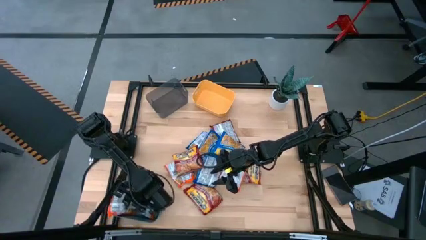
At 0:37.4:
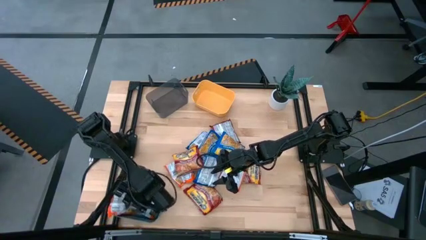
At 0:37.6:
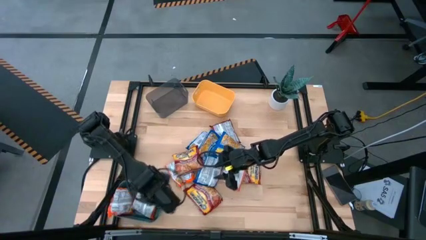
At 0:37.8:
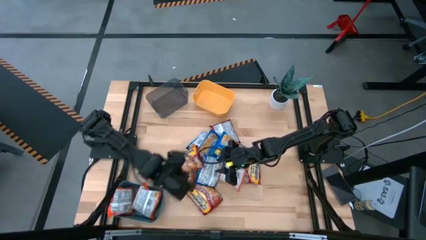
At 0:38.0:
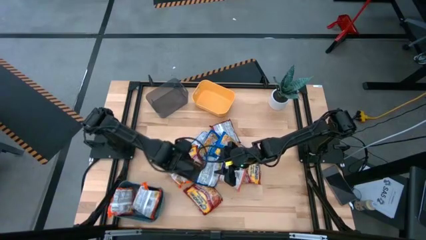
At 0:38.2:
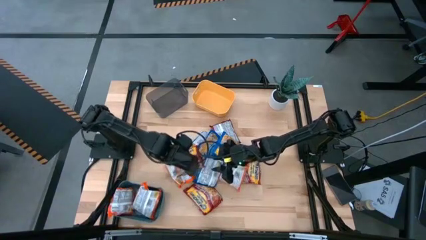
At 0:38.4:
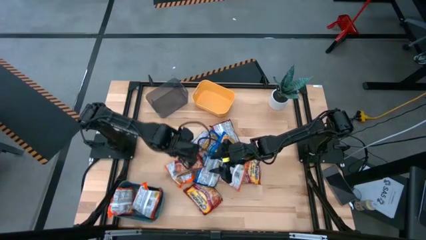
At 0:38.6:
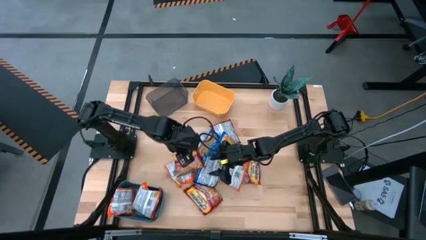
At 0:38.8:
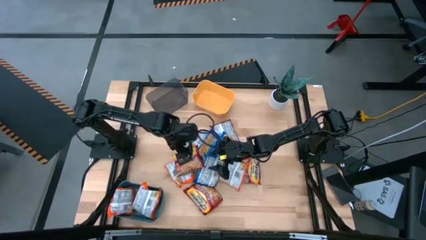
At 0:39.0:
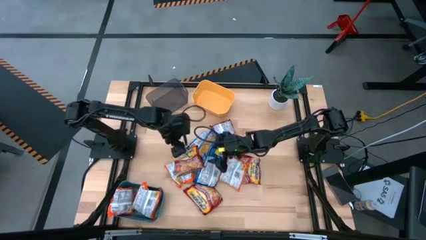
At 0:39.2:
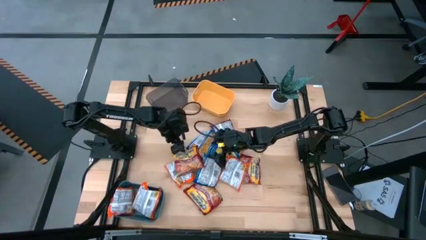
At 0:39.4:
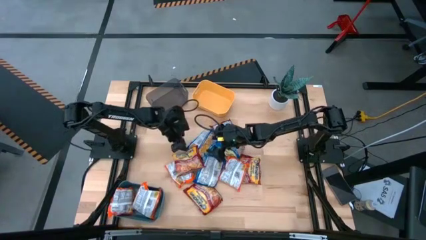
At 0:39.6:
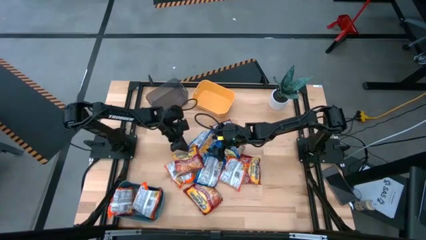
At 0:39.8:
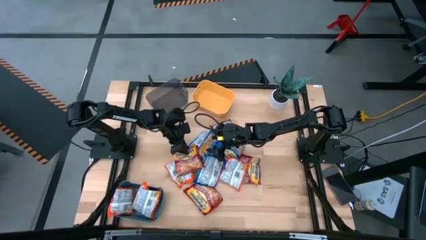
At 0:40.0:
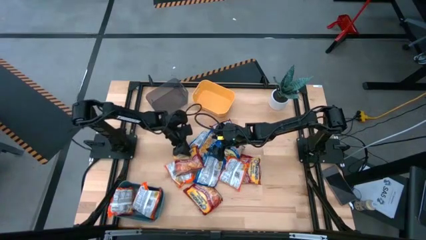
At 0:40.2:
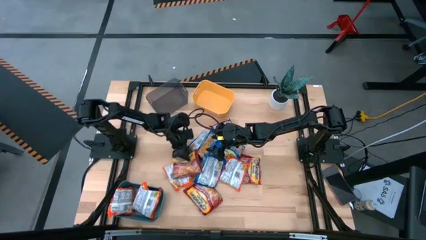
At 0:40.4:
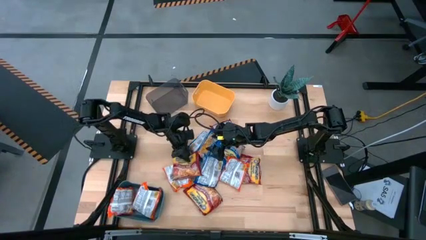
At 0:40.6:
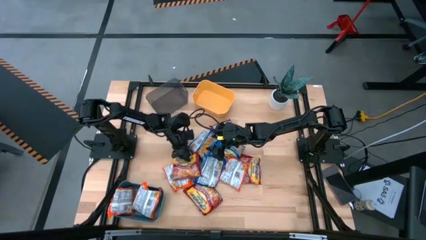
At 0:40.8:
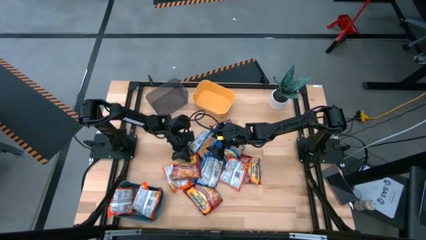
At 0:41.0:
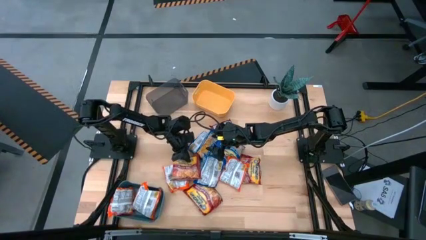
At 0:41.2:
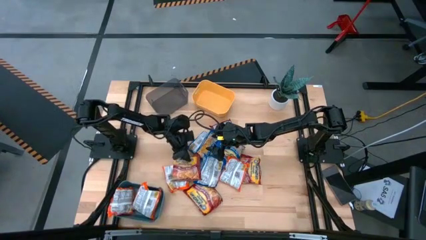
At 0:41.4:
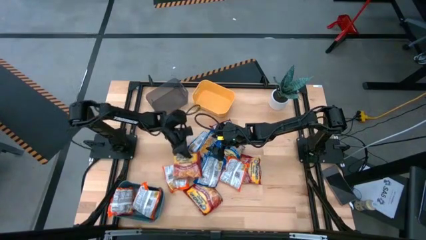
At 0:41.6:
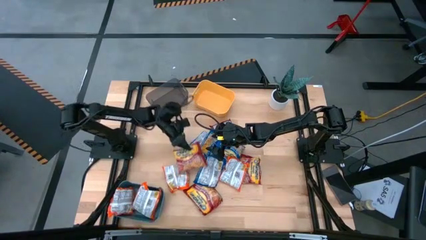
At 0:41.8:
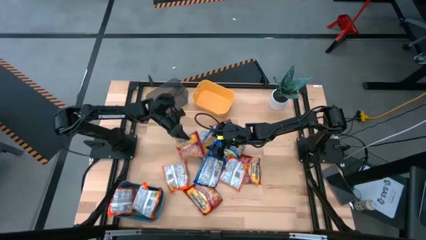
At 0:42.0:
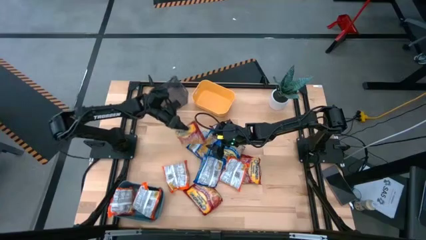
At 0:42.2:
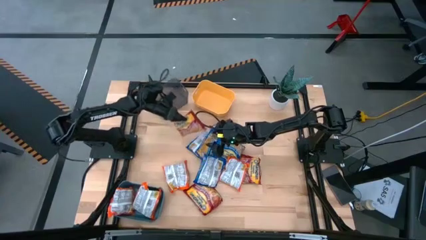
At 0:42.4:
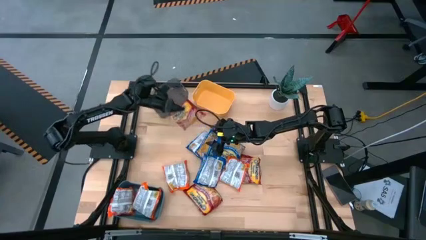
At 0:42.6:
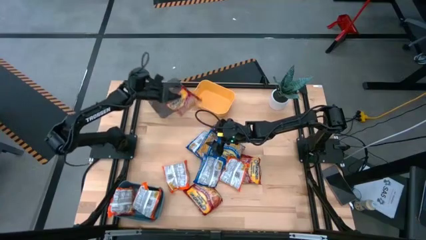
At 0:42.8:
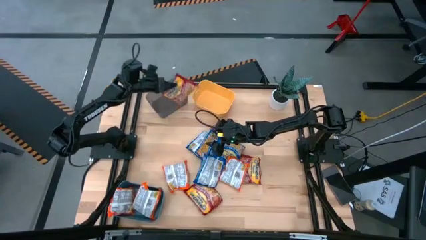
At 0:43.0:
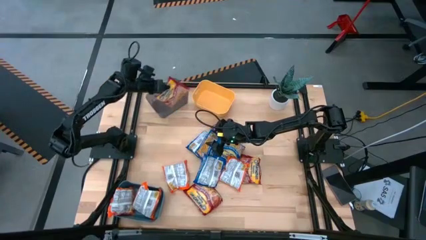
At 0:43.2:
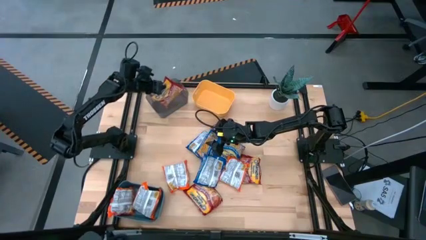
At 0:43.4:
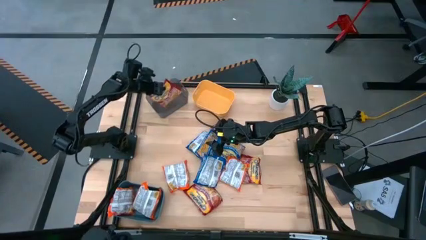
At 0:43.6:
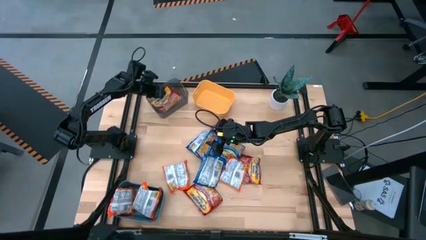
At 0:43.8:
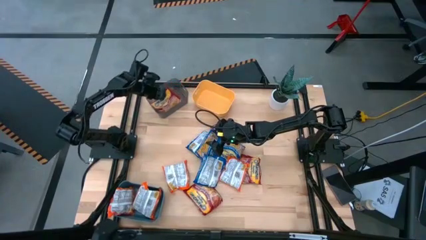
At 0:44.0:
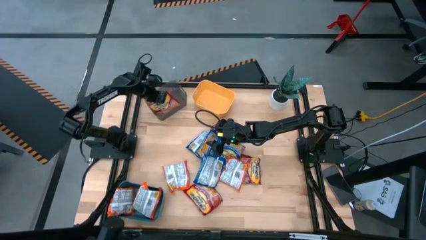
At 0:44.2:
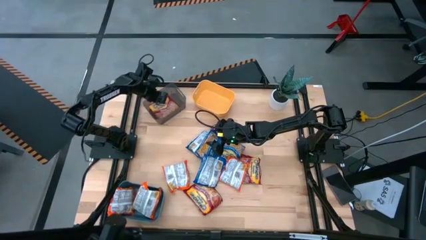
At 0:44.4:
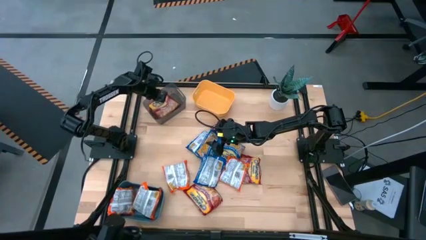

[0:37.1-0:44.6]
Task: Sort Maruchan noodles
Put the red noodle pack into the gray bin

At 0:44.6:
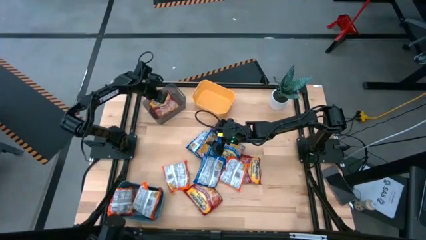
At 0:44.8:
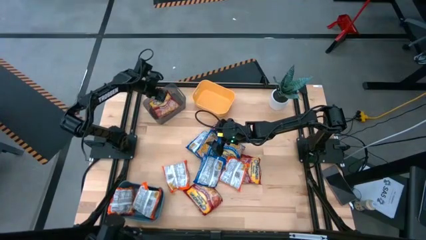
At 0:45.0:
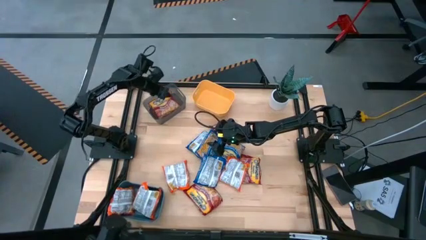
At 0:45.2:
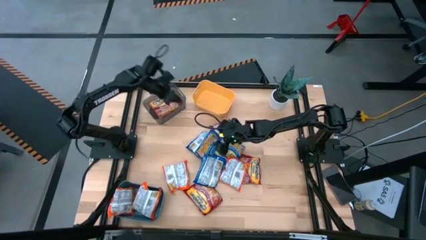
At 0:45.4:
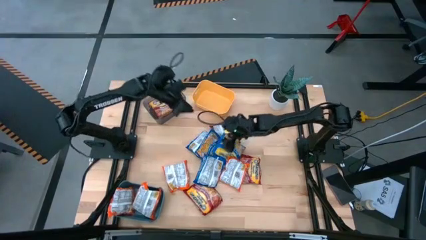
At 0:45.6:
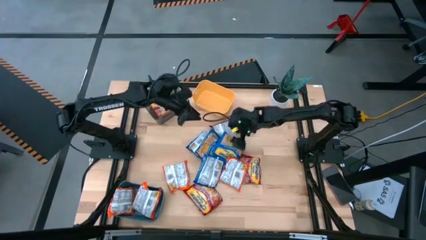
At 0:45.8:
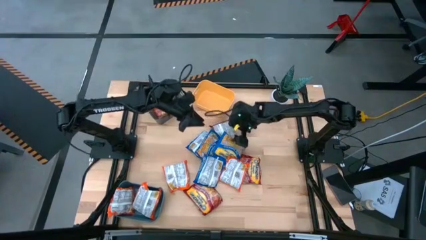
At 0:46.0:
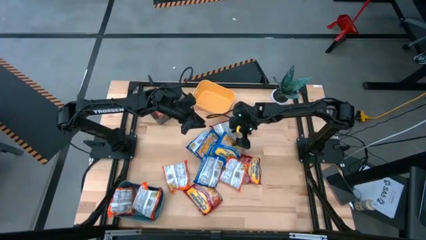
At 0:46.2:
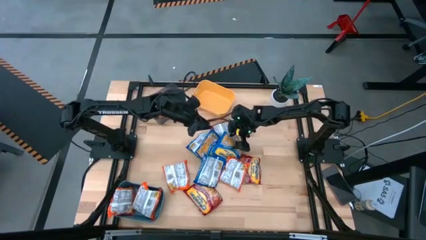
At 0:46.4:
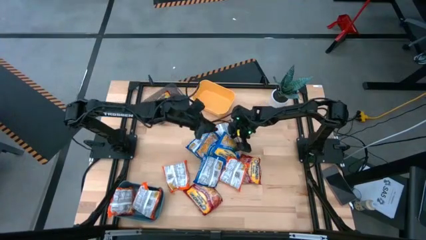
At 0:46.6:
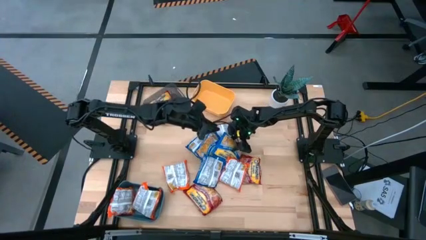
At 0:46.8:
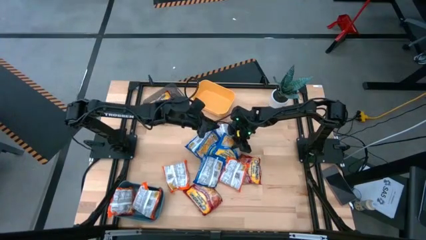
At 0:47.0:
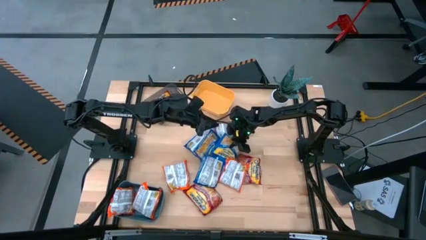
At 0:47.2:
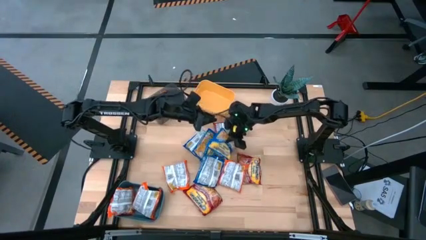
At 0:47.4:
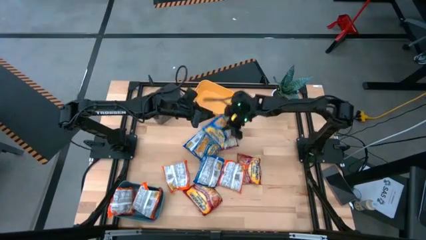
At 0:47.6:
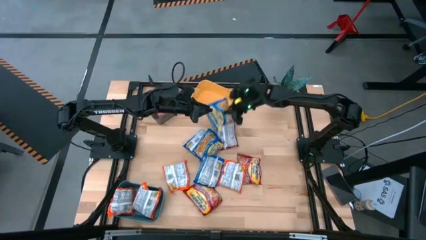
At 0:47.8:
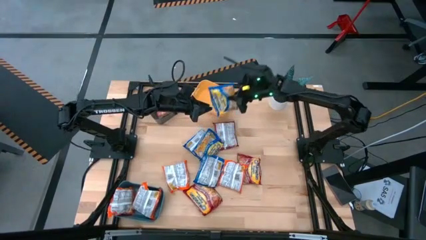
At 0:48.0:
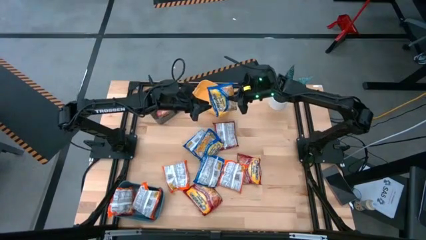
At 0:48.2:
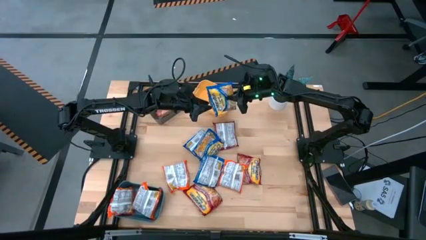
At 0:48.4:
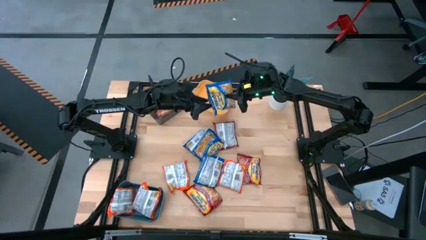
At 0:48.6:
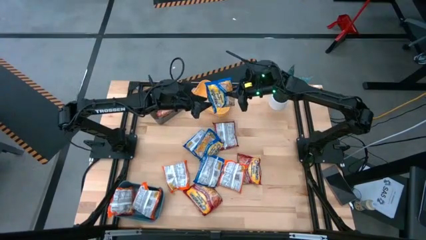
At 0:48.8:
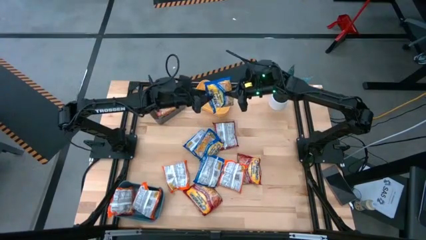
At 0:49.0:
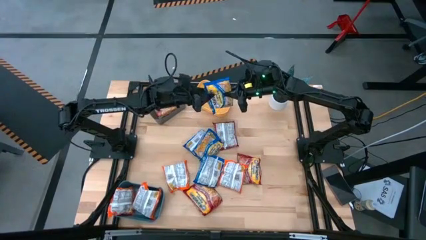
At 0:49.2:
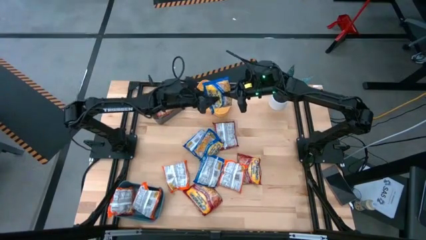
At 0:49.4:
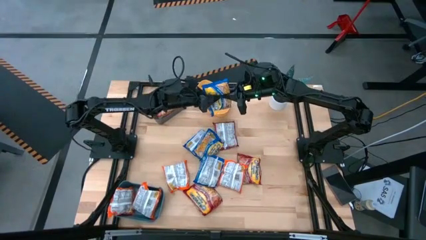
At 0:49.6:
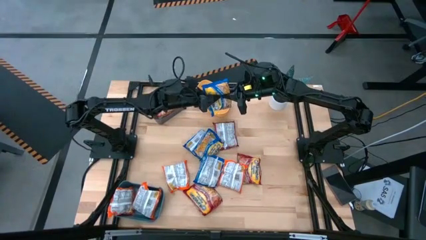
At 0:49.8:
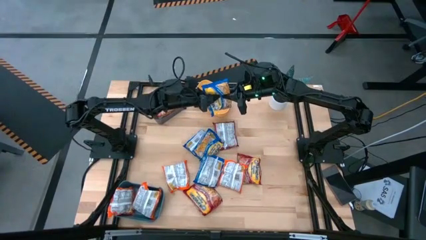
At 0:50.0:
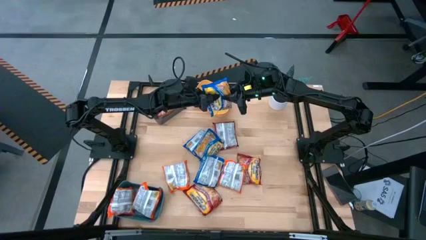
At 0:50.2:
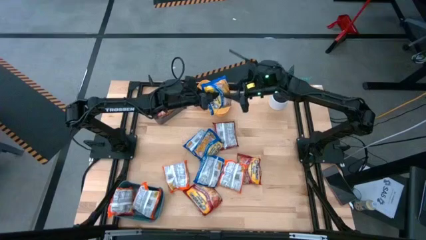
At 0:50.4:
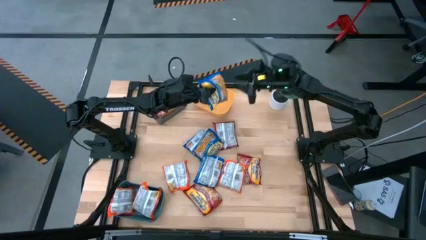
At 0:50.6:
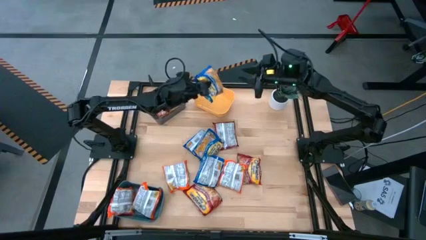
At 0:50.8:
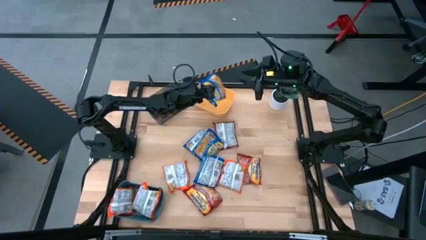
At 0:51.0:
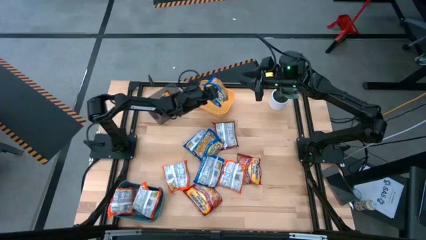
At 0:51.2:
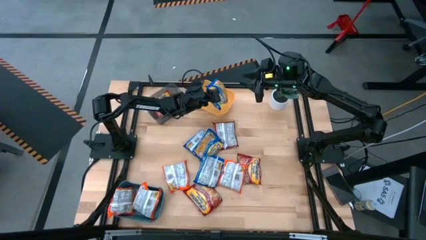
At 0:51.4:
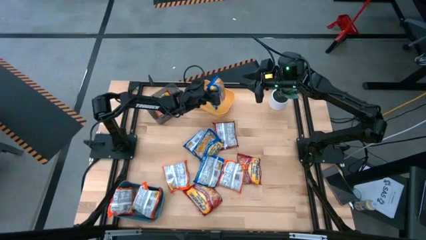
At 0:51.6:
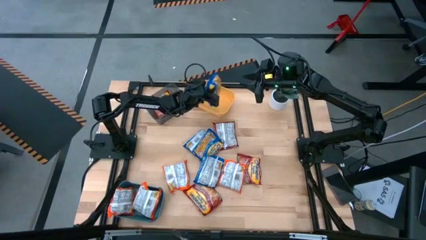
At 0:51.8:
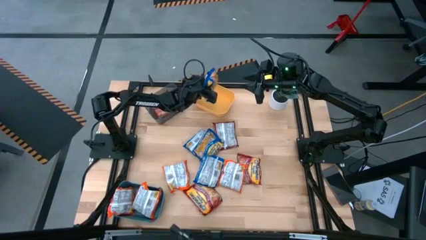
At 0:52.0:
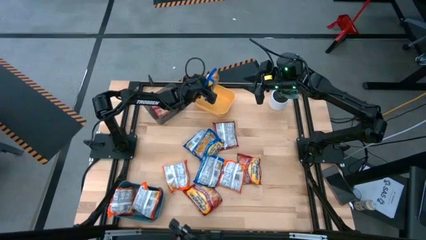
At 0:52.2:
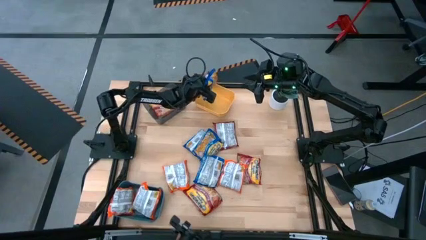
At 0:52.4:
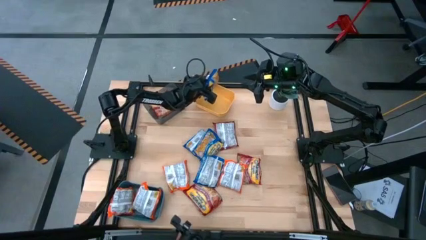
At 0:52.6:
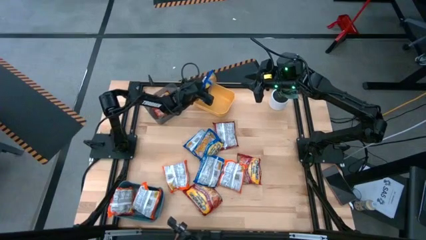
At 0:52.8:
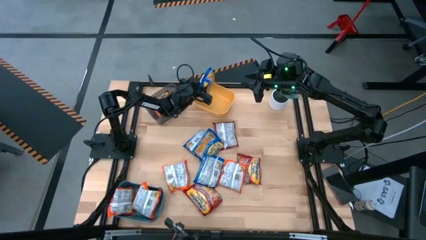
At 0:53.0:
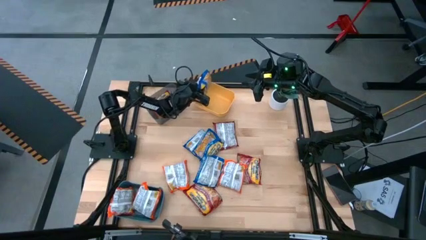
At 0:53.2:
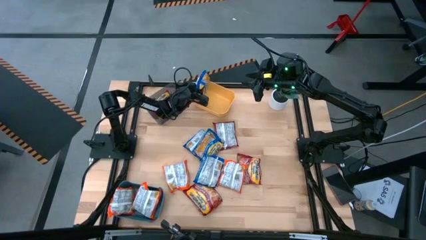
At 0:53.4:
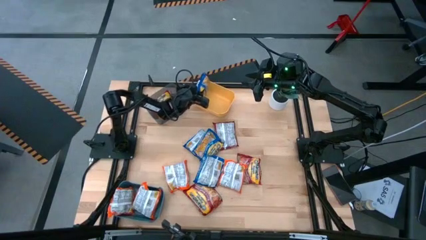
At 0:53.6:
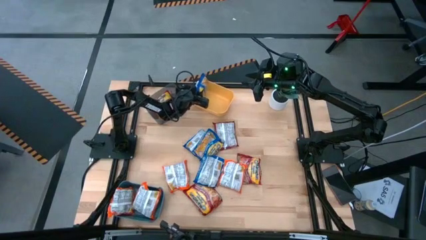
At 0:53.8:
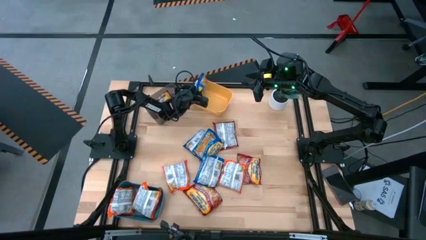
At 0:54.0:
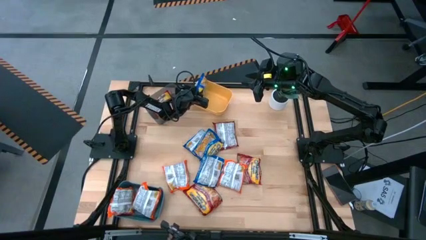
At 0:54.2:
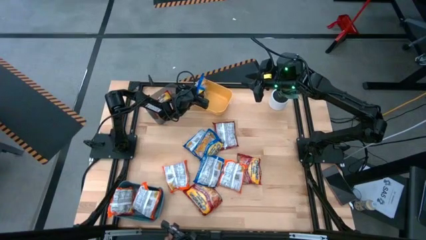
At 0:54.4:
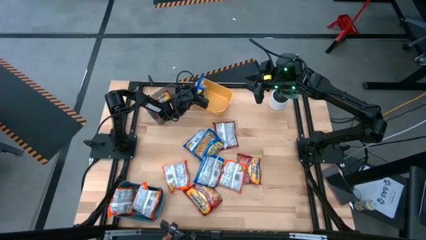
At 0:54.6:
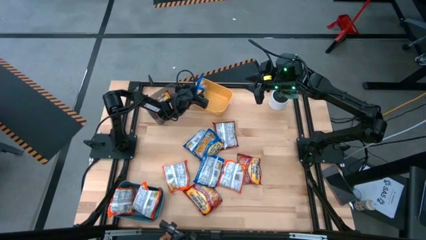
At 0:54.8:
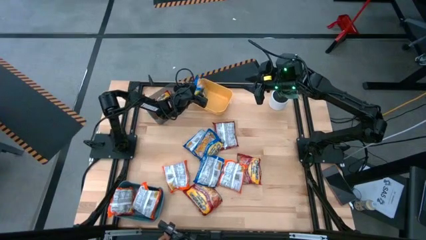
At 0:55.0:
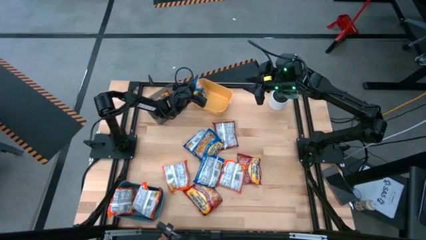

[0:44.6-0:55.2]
Put the blue noodle pack into the yellow bin
